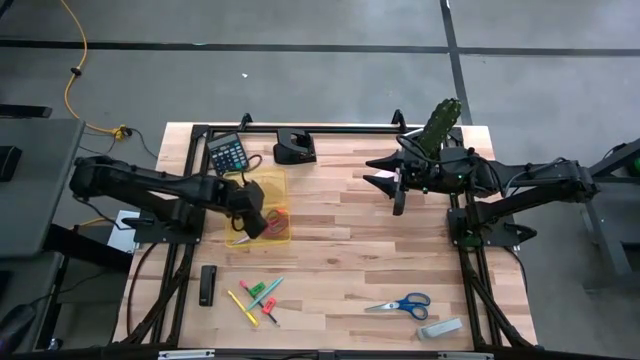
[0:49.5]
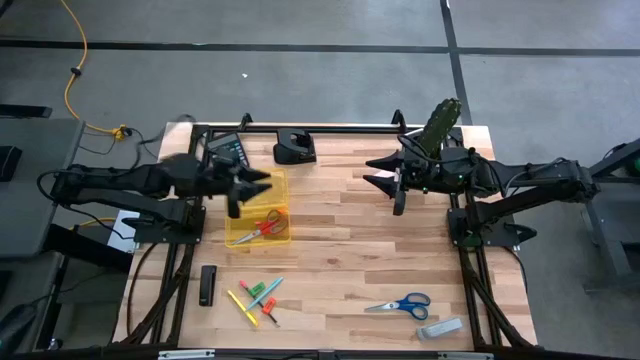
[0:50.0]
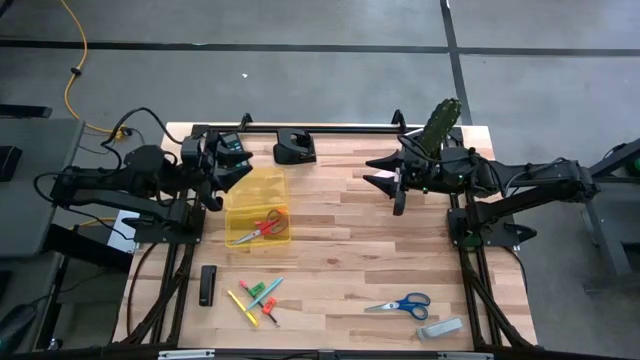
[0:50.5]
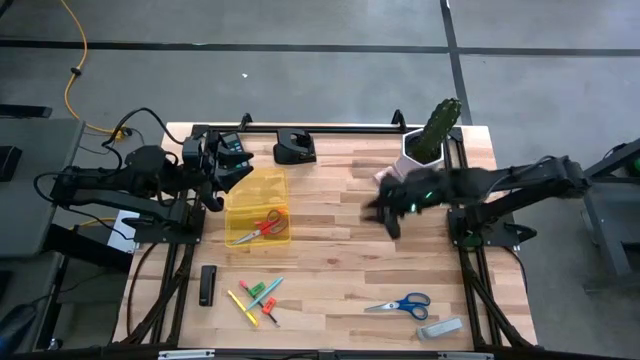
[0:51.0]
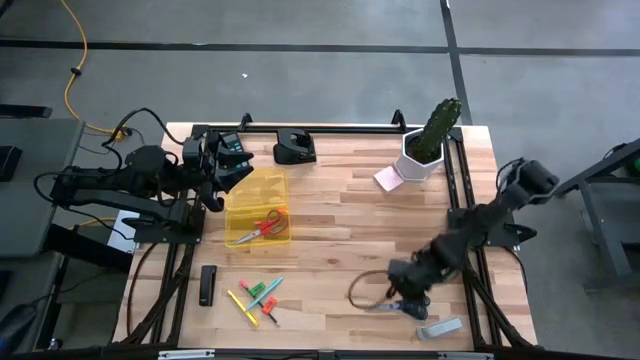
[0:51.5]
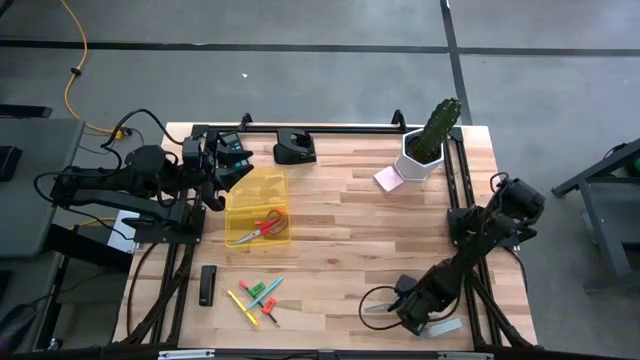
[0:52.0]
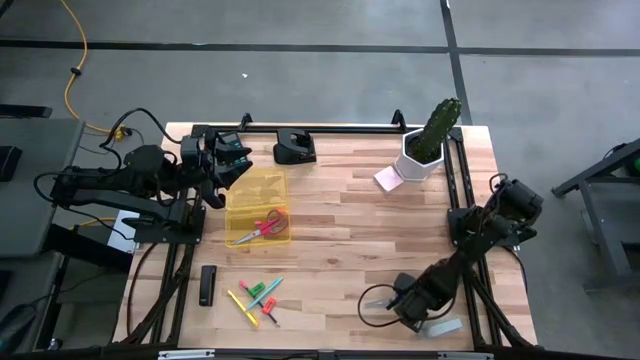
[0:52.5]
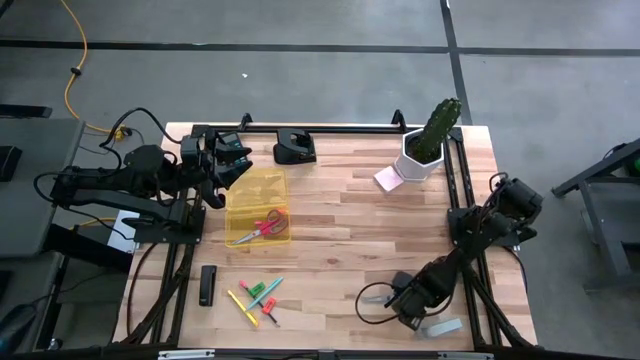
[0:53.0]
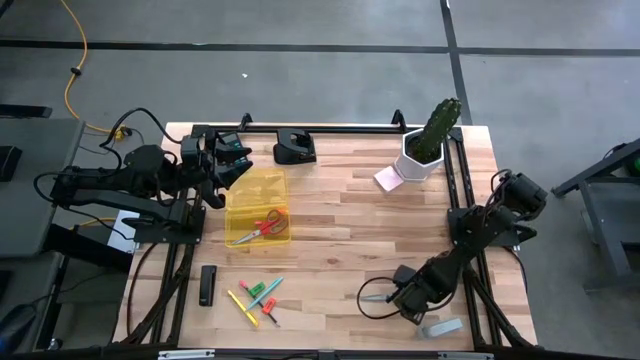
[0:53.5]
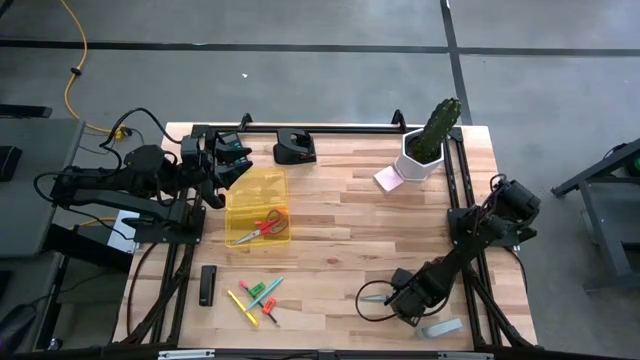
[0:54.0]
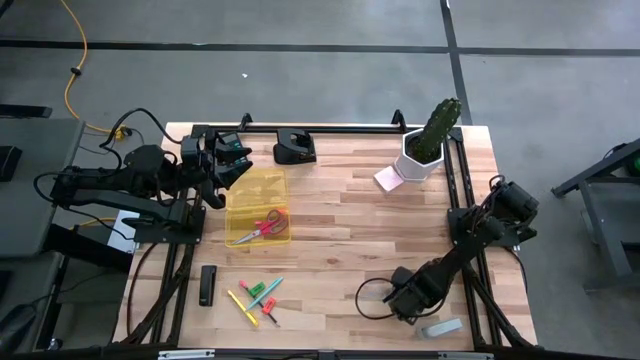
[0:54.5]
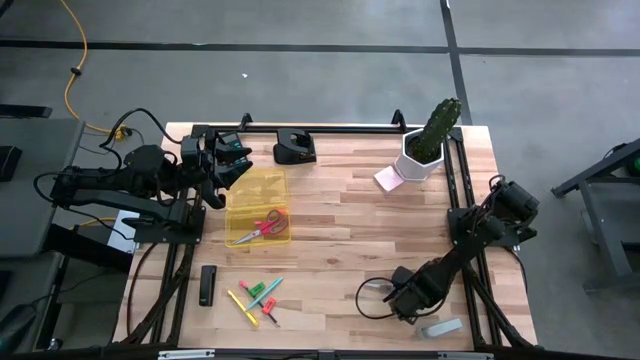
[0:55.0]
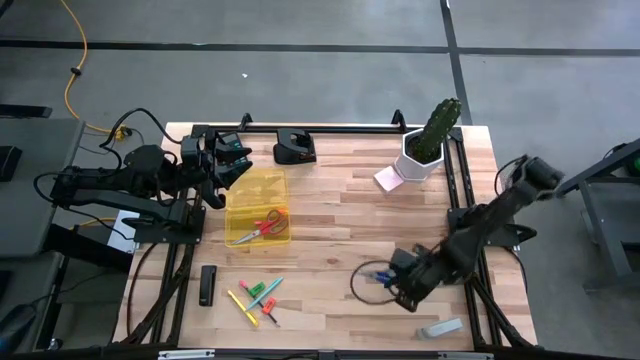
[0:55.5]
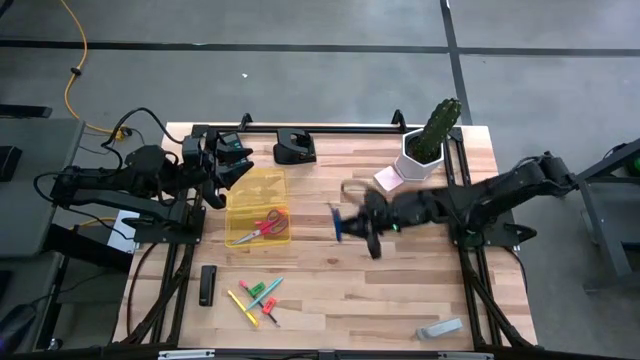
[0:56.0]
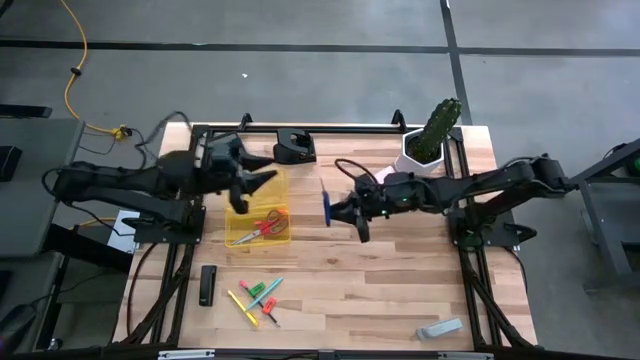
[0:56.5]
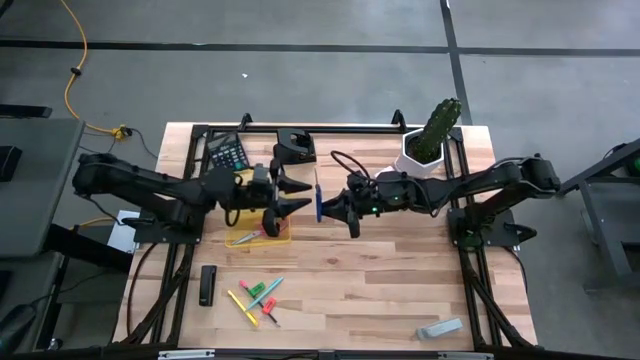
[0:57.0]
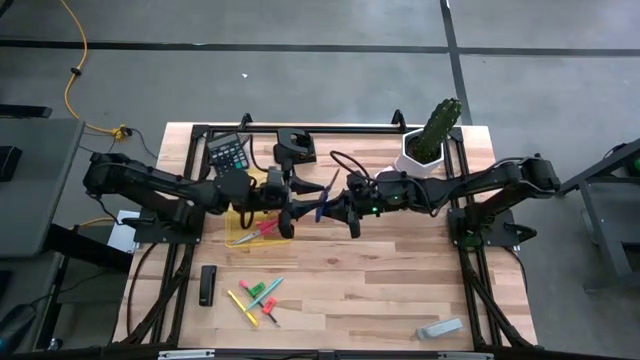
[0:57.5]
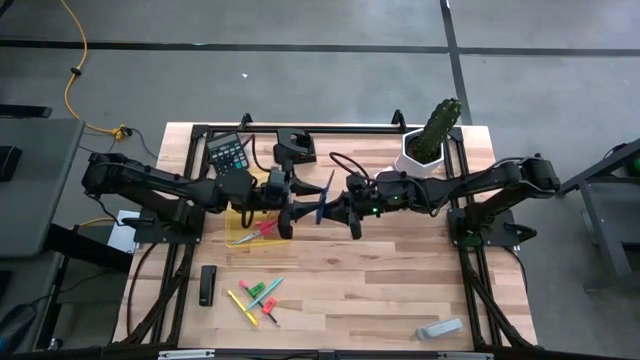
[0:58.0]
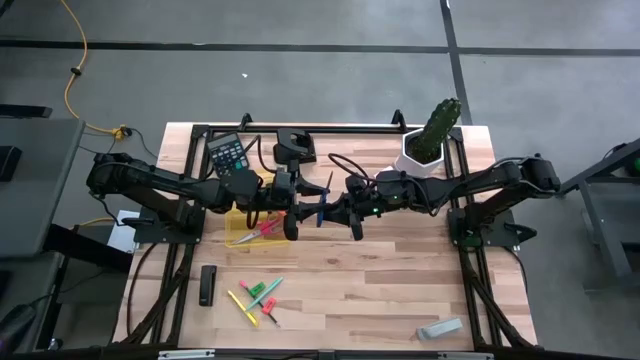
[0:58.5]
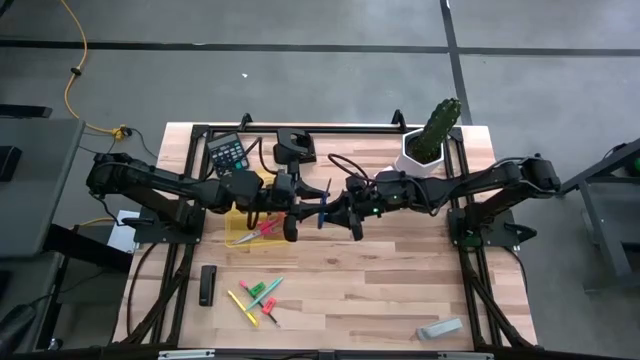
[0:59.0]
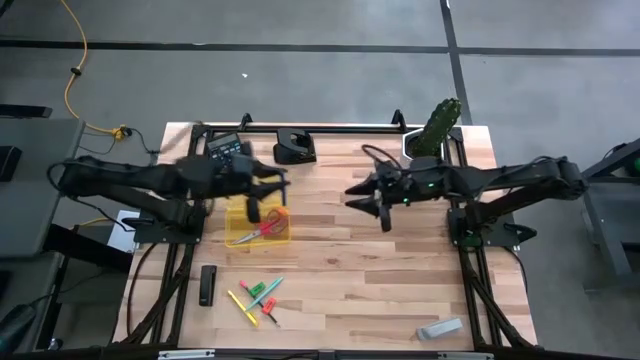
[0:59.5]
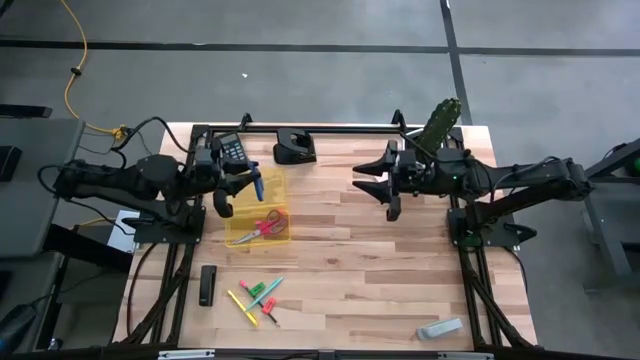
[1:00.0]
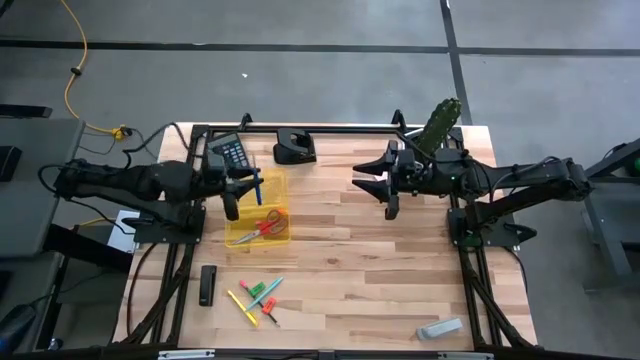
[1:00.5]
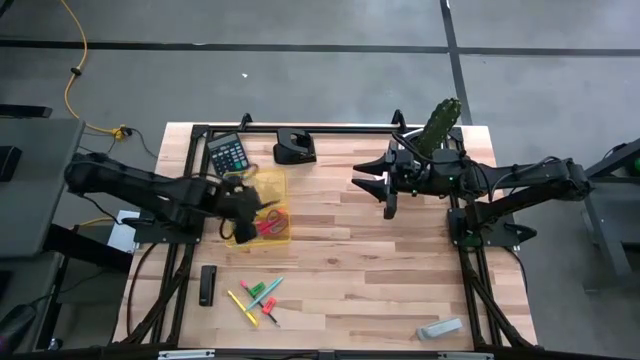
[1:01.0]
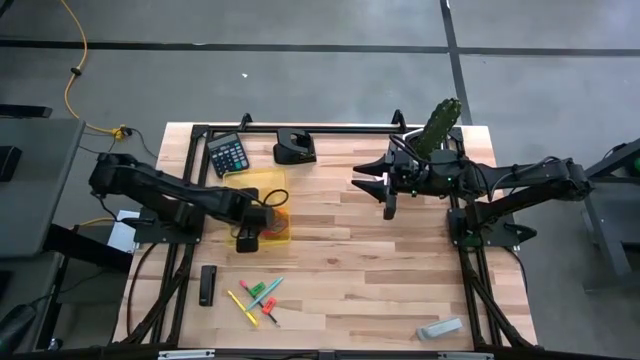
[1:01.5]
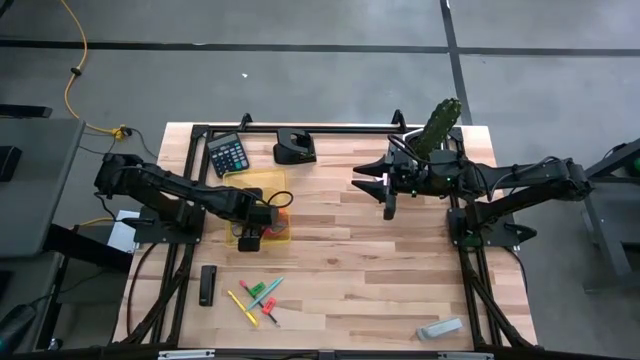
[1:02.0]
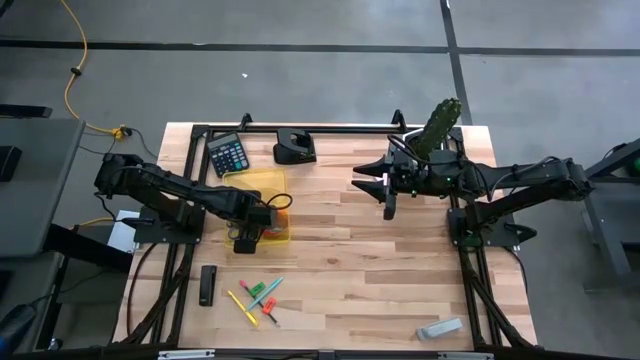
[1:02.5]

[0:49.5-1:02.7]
Task: Pack school essentials
Put the blue scissors into the yellow supply box

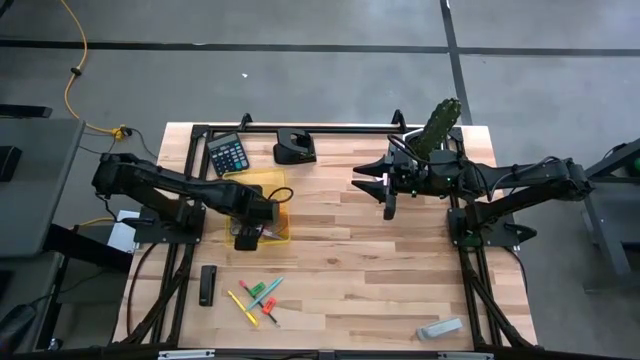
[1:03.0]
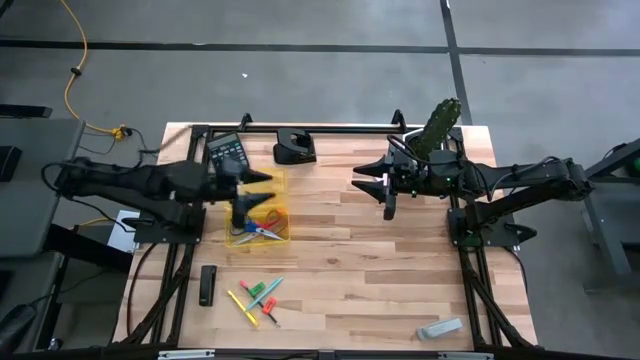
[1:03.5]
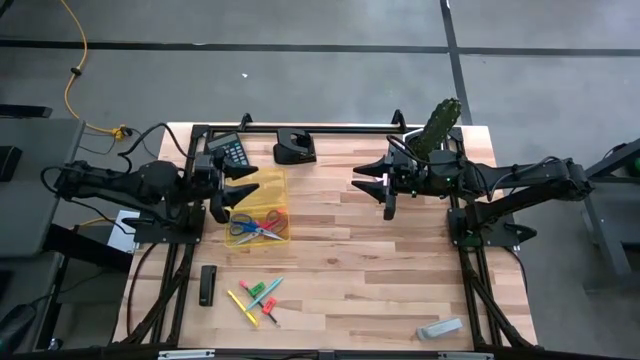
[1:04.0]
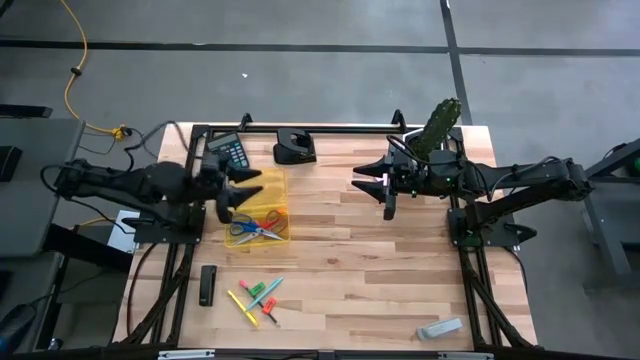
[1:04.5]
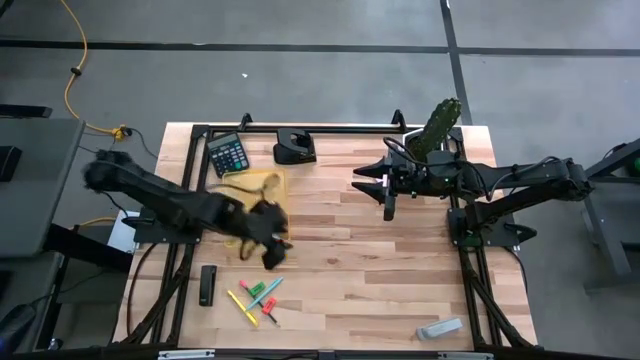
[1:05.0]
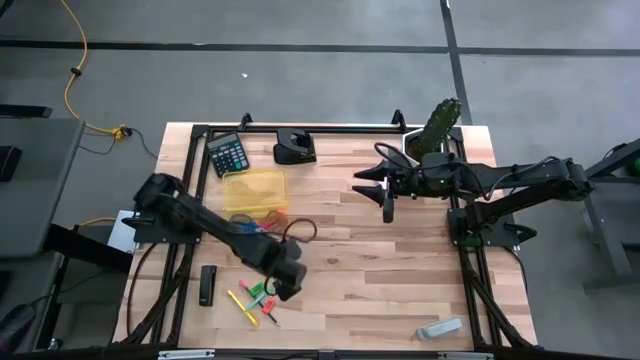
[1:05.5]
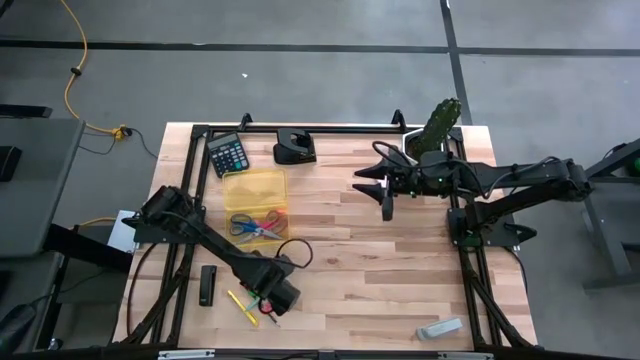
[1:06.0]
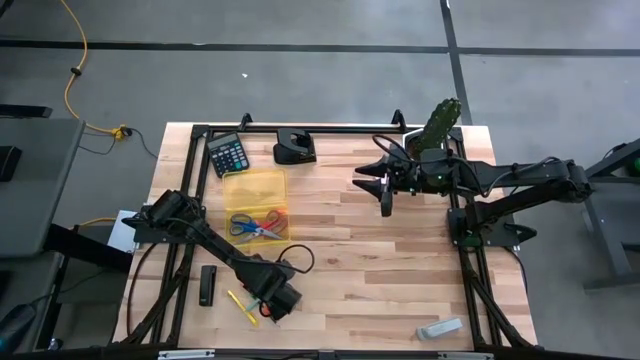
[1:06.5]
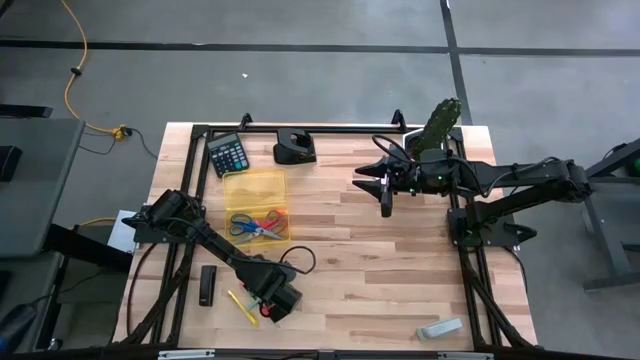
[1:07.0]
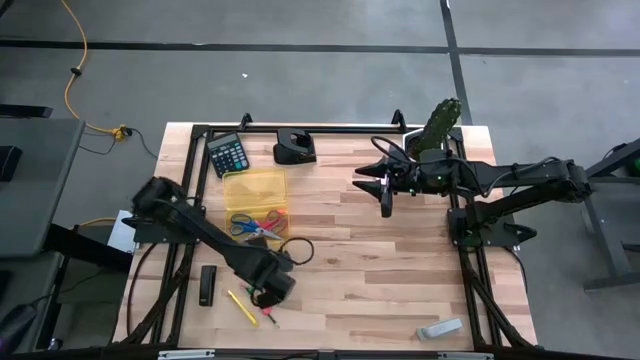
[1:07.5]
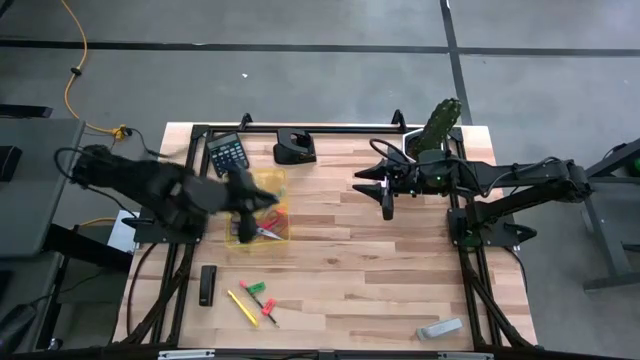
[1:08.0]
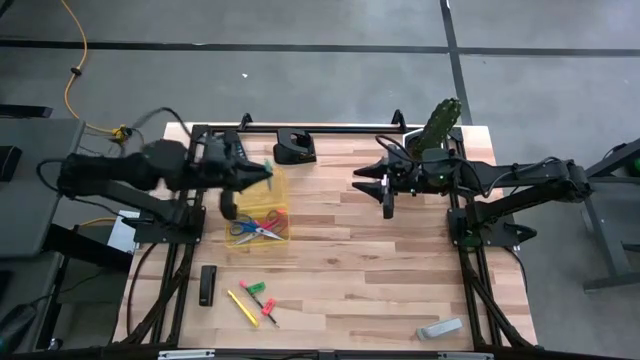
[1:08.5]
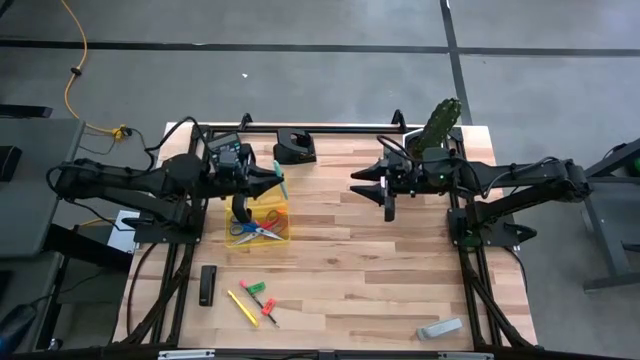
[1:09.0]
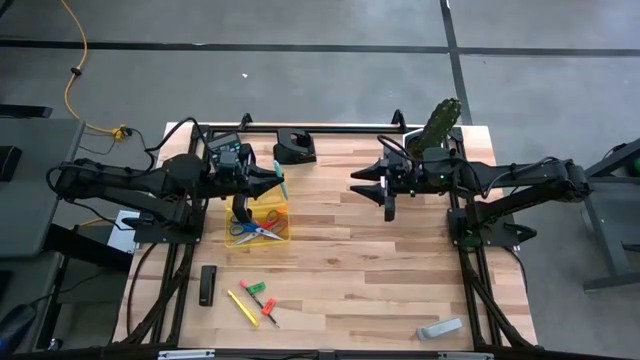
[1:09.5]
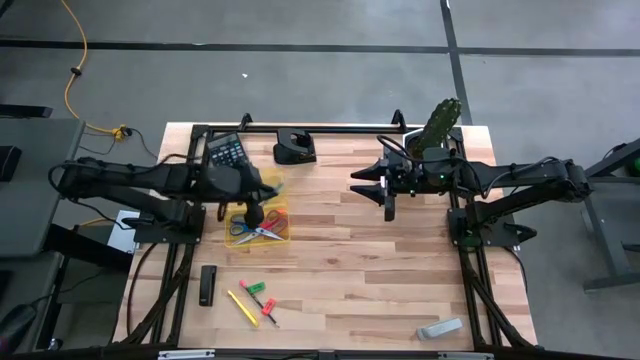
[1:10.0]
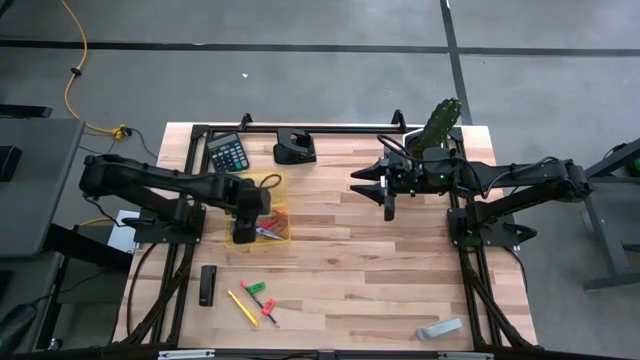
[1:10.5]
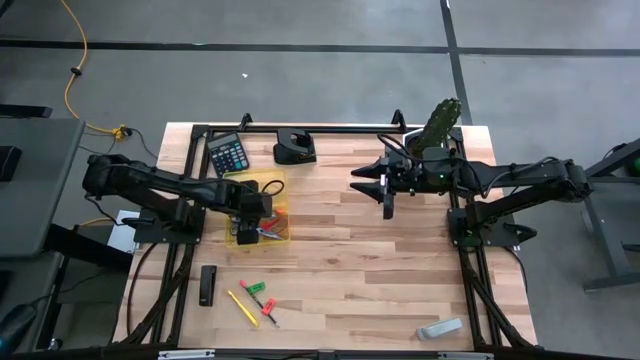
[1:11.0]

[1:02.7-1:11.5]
Put the blue pen into the yellow supply box

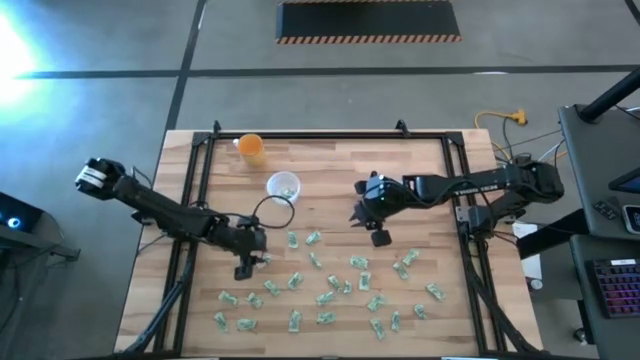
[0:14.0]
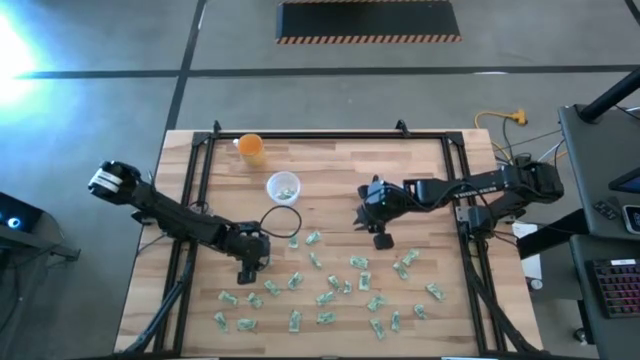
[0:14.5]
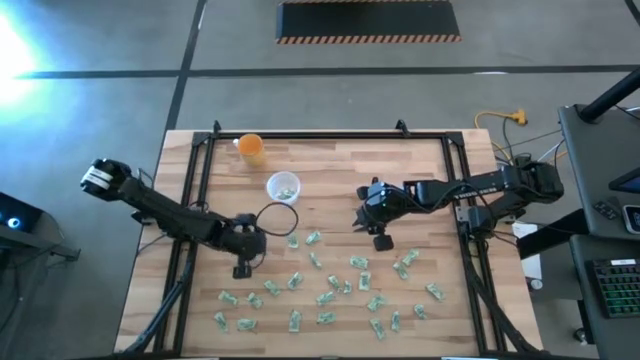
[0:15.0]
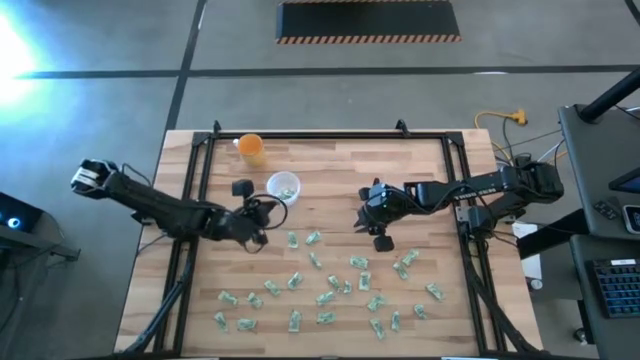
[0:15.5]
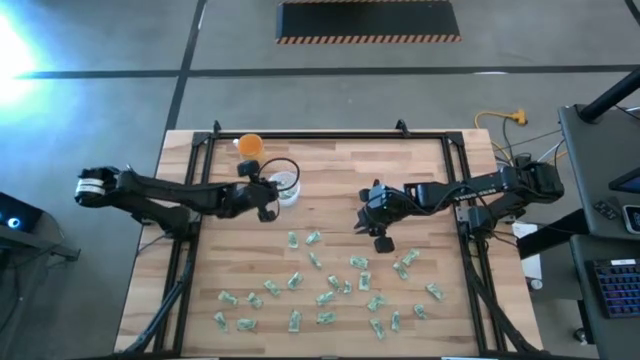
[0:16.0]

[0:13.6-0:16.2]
Task: Pick and place Stevia / Truvia into bins
Put the stevia packet into the transparent container
